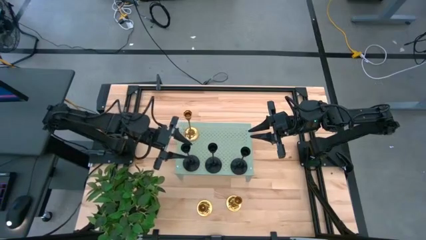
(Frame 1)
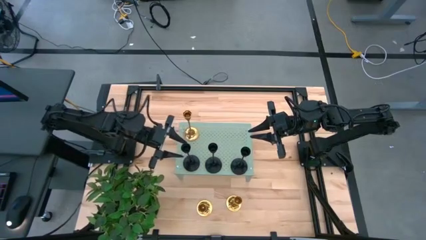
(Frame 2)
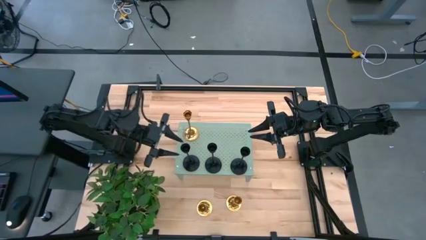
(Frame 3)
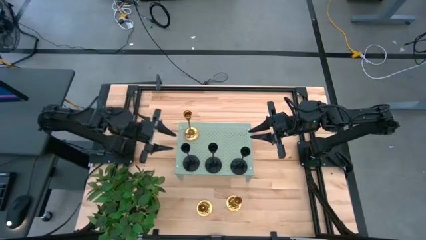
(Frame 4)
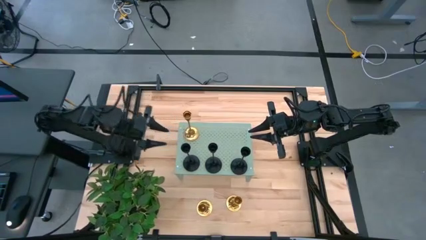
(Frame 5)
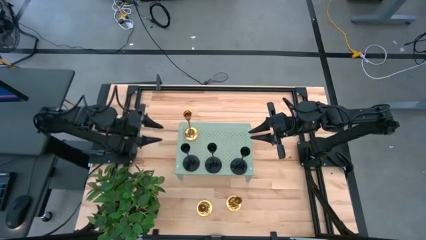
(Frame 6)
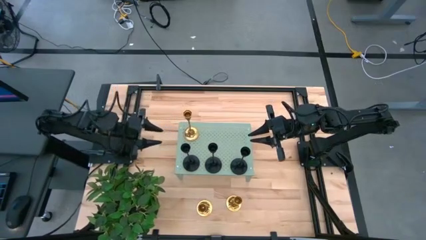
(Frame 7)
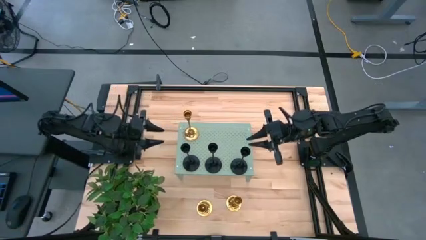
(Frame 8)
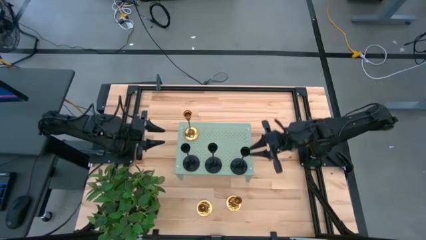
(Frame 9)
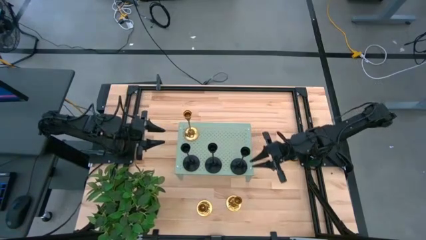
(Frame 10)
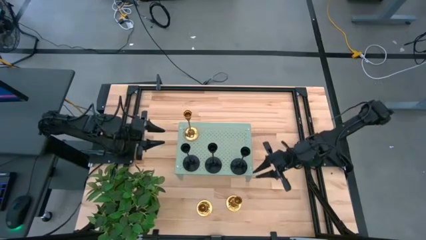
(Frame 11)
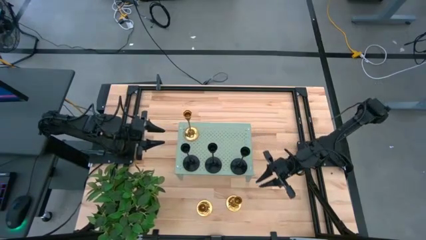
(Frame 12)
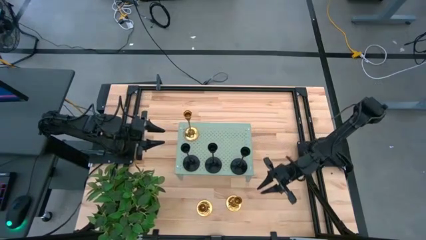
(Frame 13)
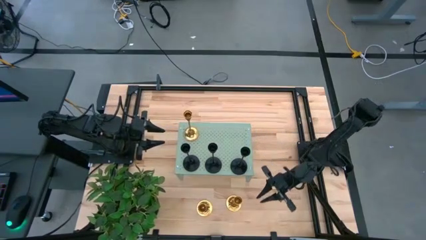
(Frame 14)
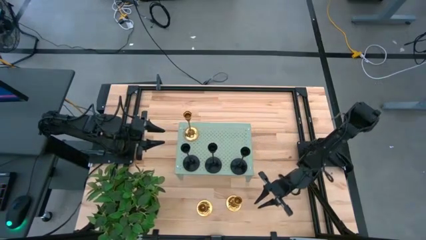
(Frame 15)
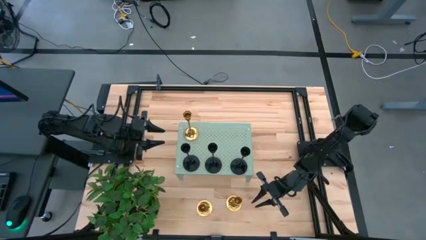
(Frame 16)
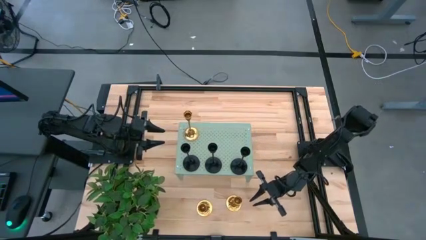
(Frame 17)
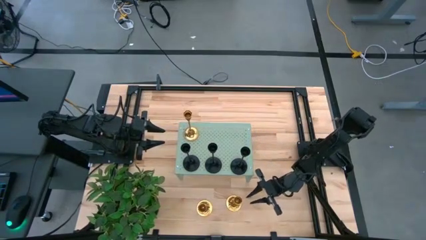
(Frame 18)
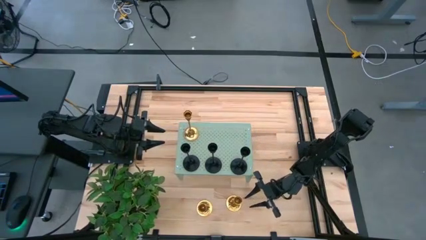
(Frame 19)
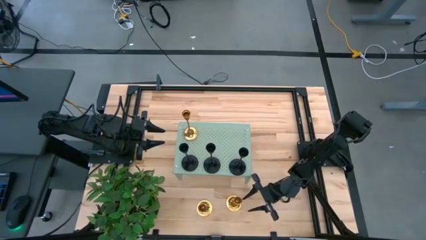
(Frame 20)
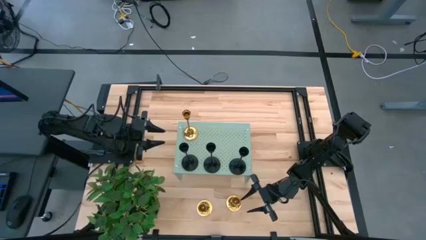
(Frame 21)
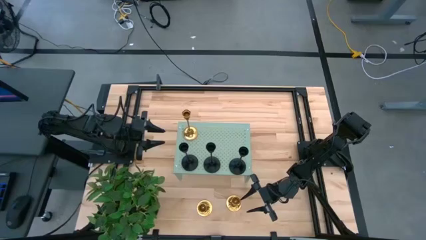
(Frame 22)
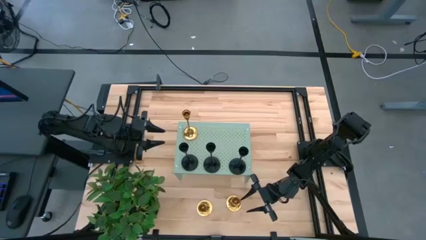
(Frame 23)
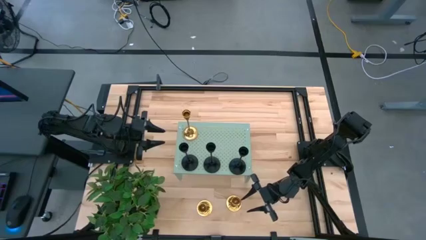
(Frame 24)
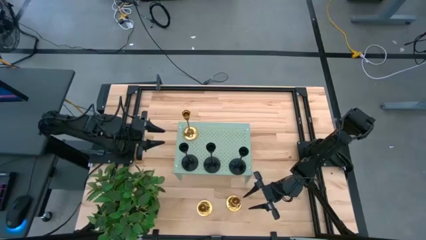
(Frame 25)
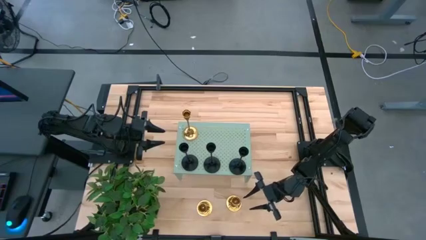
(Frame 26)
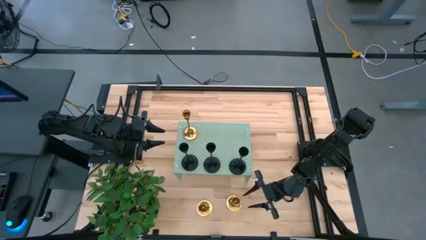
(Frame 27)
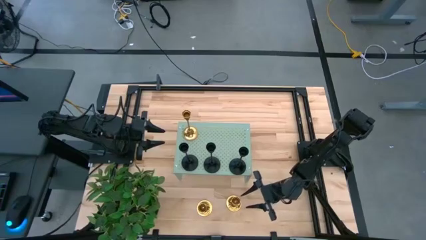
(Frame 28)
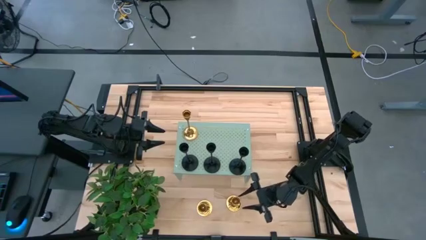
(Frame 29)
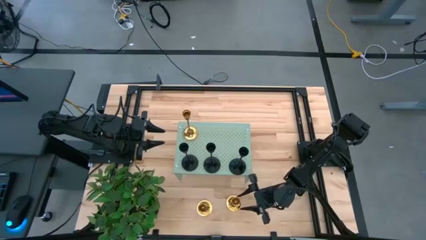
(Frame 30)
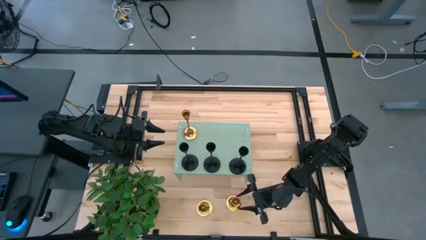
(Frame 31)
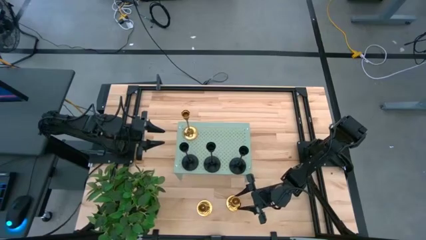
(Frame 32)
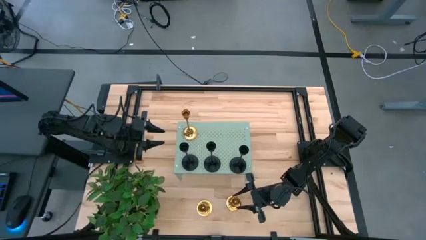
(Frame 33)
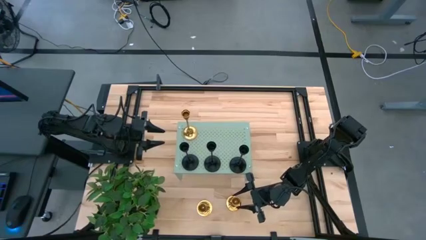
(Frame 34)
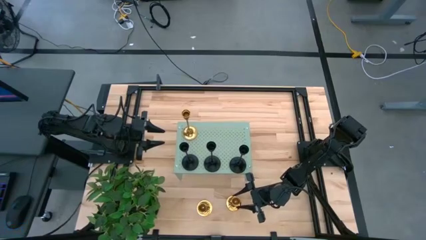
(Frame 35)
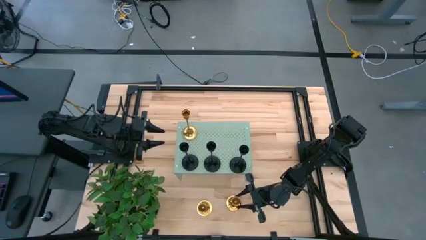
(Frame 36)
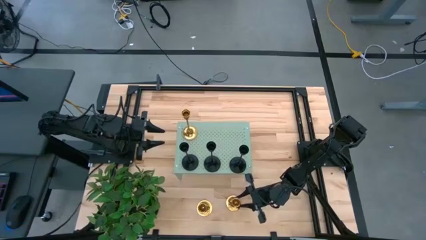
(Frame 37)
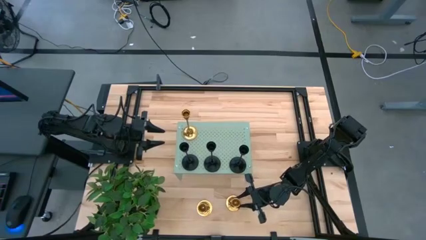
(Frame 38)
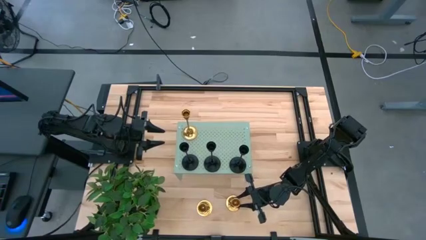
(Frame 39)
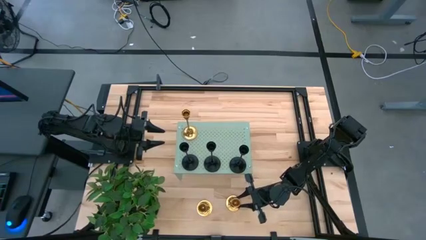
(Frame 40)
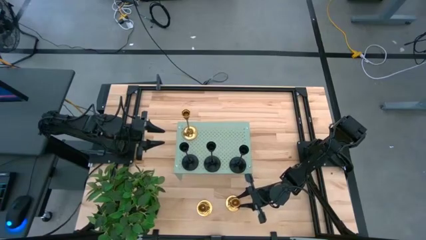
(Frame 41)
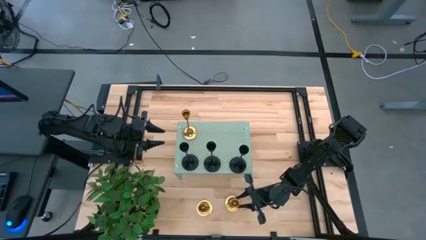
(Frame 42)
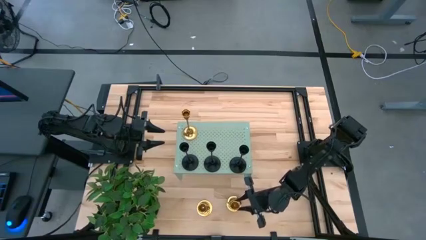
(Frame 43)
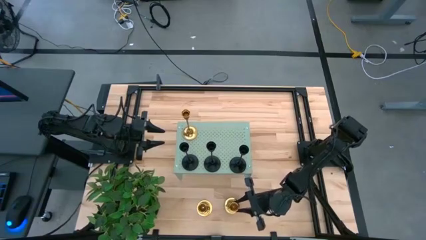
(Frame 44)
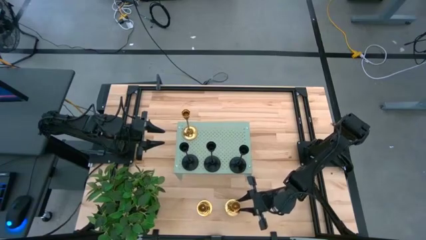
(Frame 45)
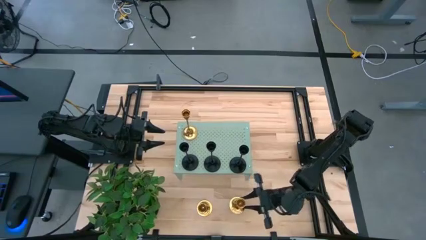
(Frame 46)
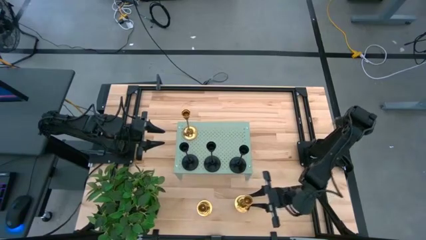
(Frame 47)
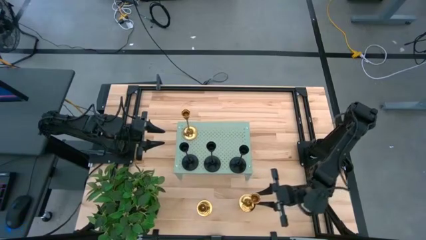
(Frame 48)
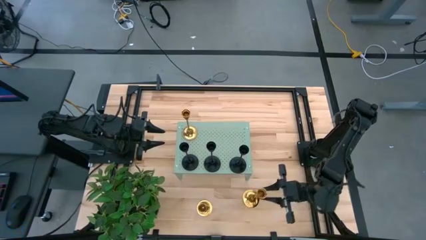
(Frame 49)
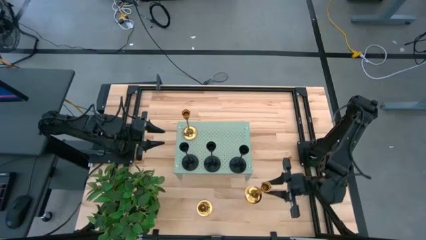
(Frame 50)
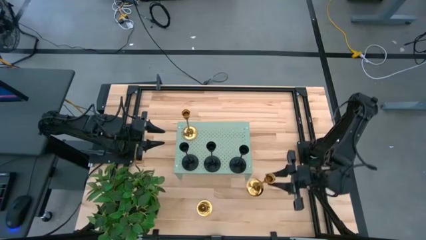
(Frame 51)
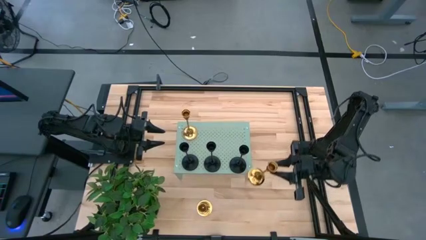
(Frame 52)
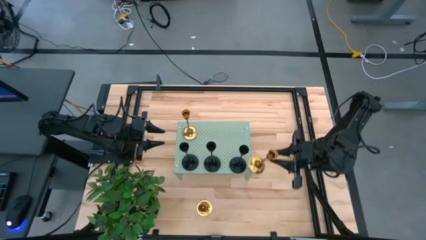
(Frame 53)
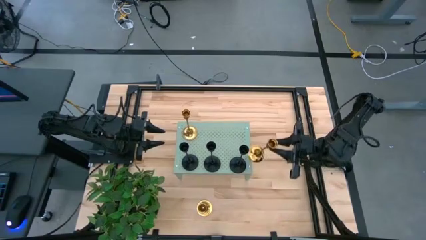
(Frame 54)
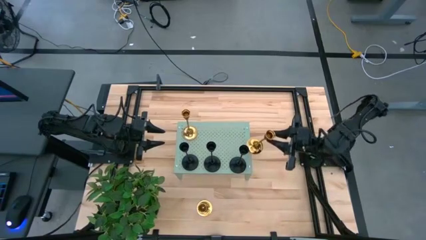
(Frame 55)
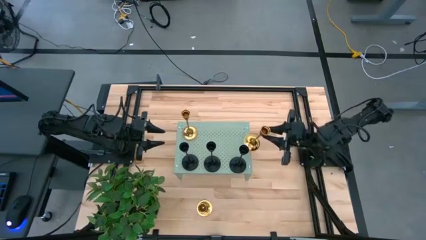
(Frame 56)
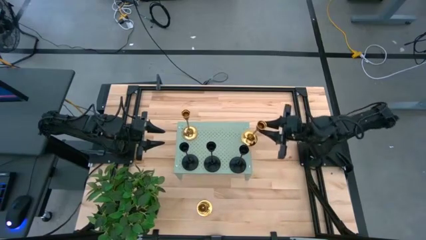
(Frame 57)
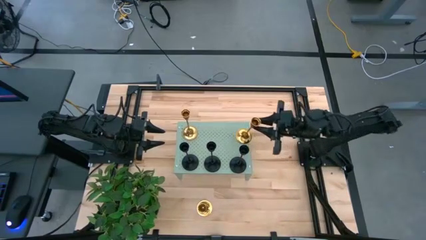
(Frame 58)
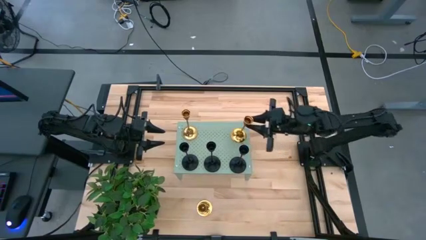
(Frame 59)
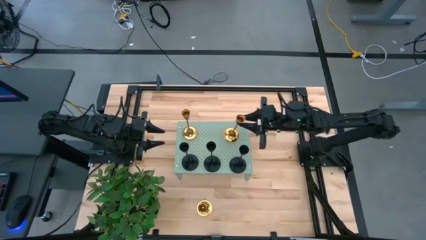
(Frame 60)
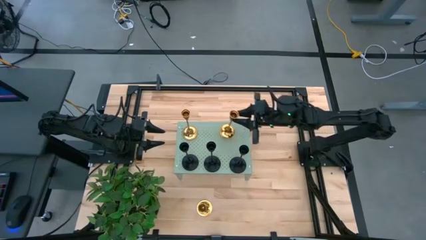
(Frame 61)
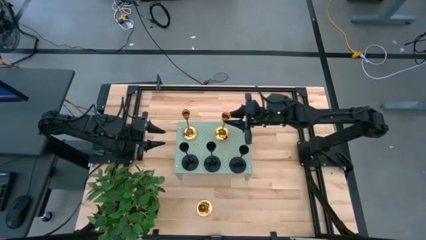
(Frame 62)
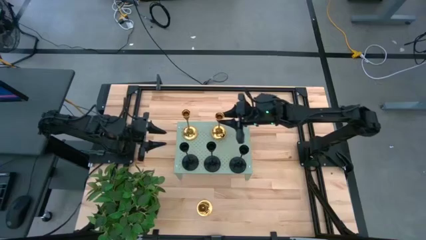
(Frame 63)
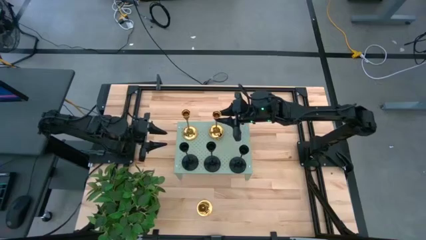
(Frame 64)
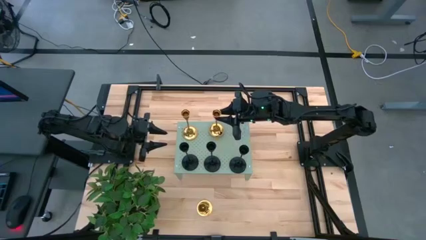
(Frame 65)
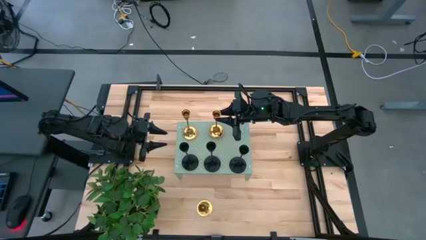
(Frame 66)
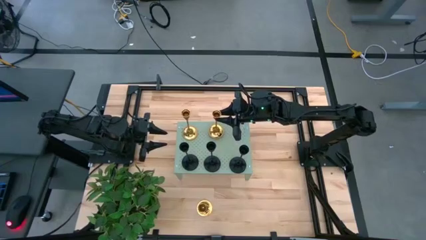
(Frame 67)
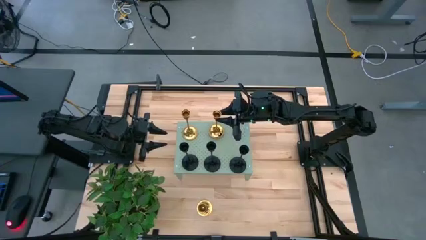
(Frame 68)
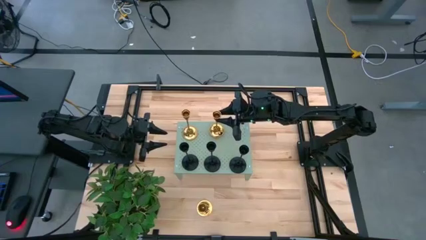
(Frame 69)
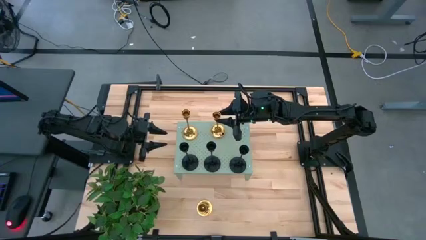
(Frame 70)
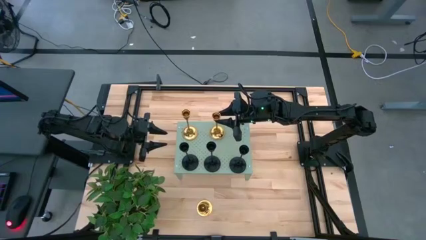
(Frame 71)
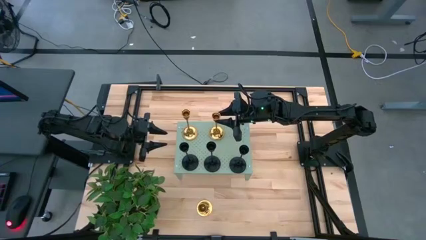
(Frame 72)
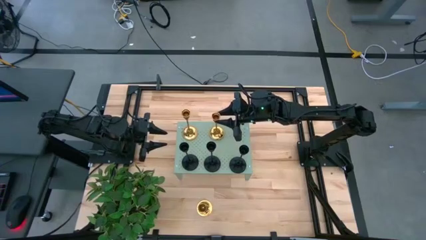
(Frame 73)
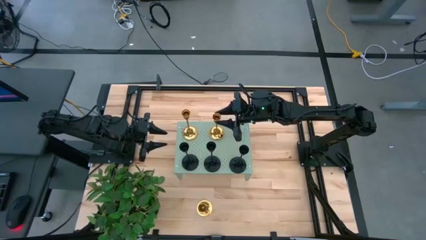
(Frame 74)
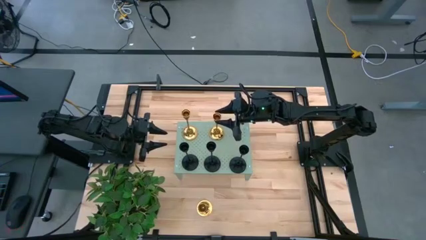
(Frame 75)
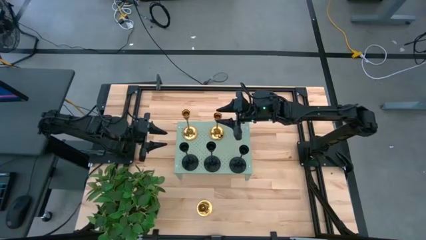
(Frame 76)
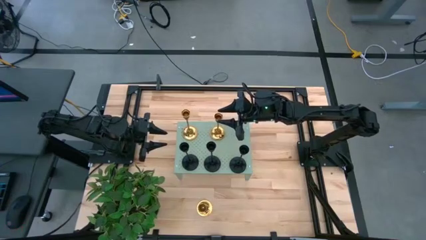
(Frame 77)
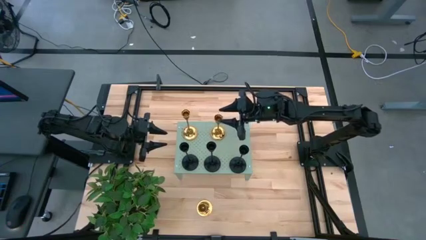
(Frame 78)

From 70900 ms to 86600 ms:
Task: Pick & Place candle stick holders
Put the bottom right golden candle holder aligned with the black candle holder on the shelf
